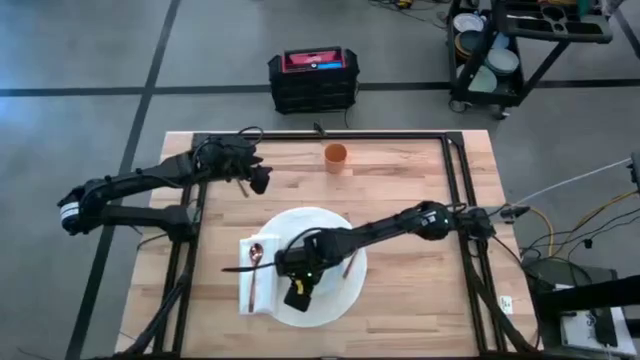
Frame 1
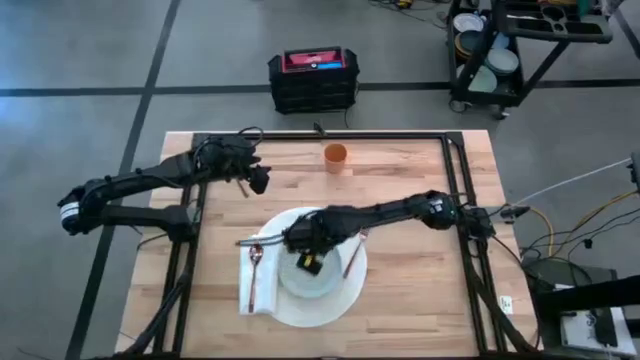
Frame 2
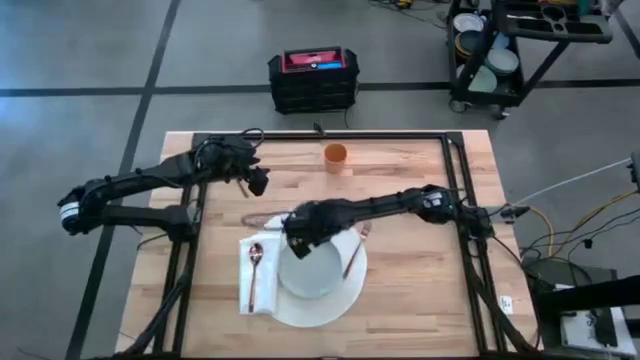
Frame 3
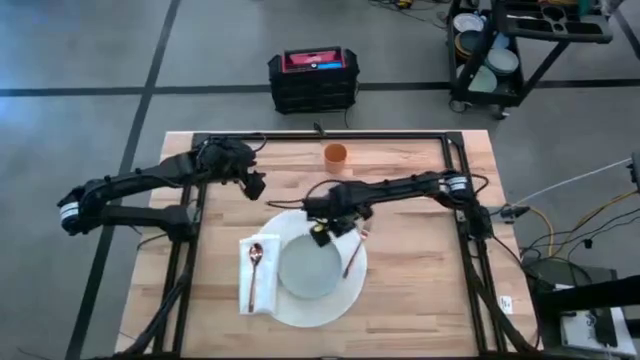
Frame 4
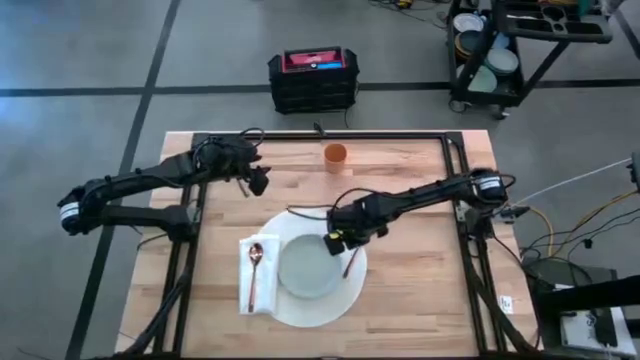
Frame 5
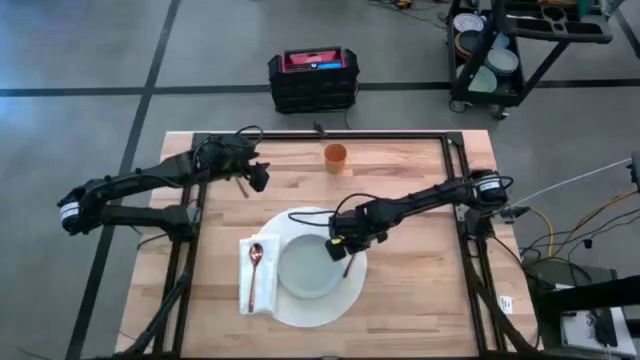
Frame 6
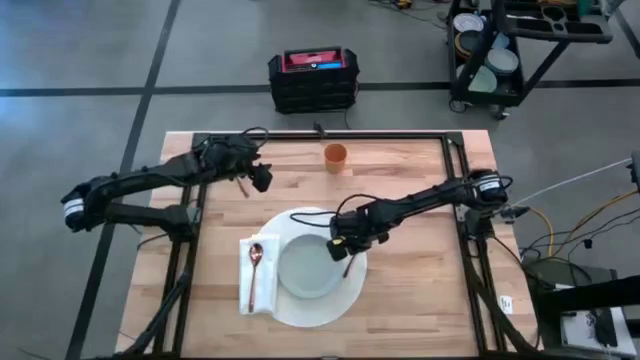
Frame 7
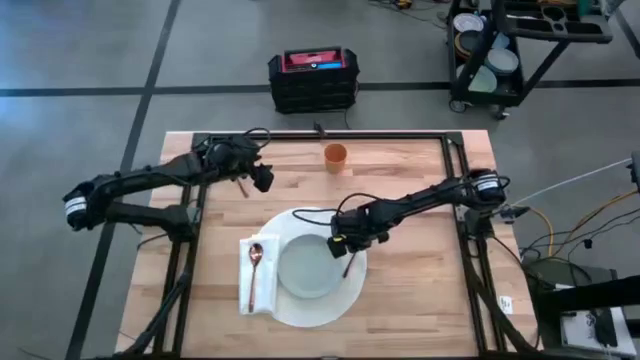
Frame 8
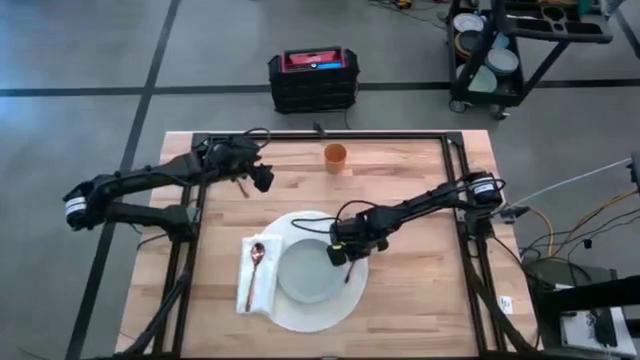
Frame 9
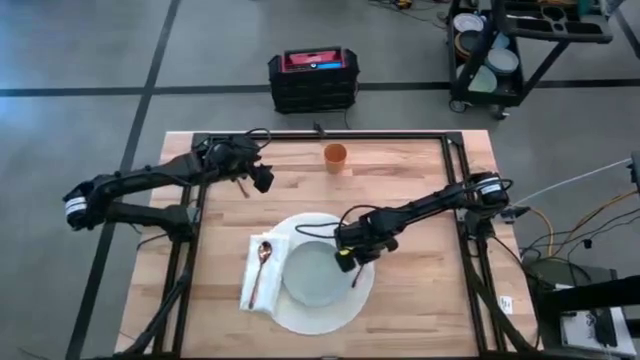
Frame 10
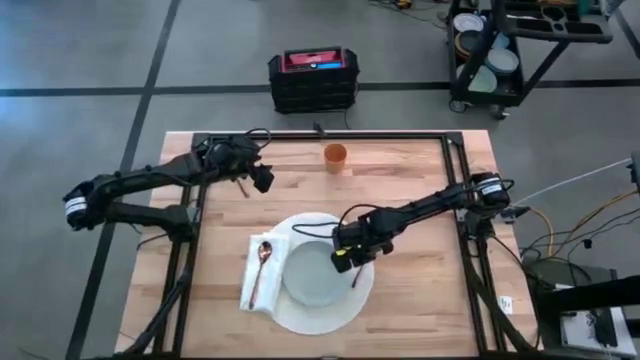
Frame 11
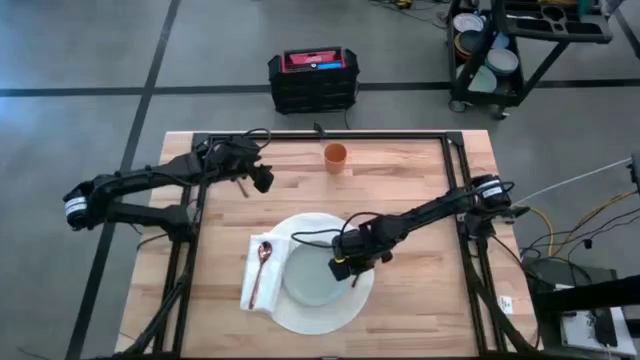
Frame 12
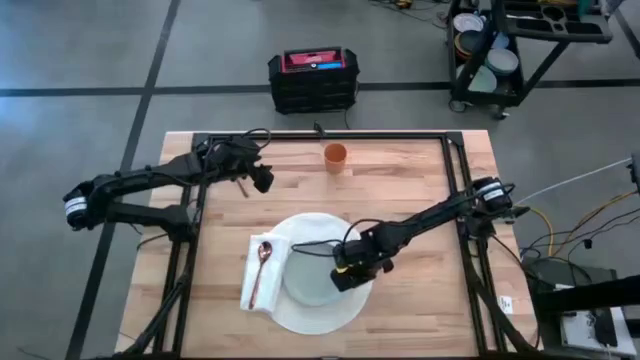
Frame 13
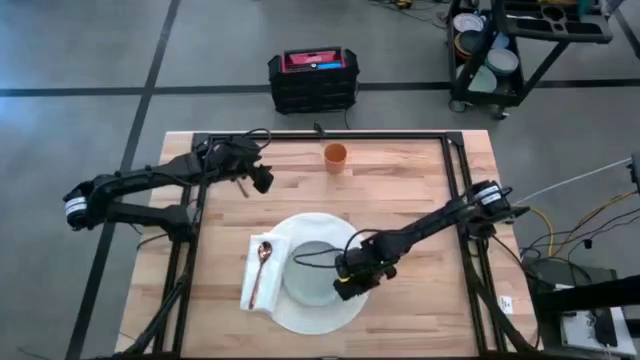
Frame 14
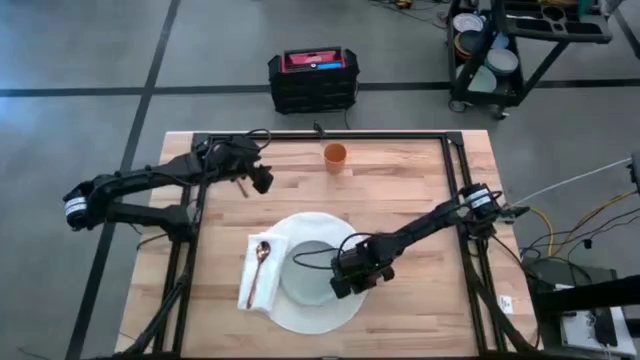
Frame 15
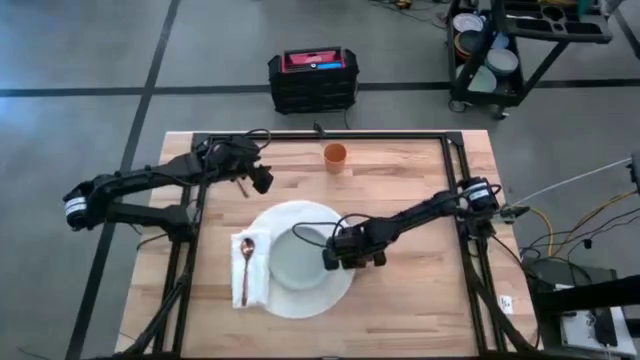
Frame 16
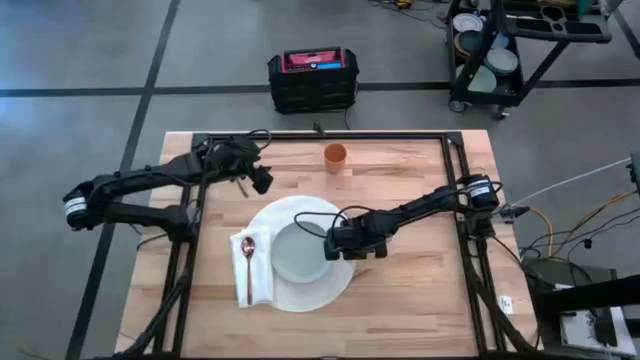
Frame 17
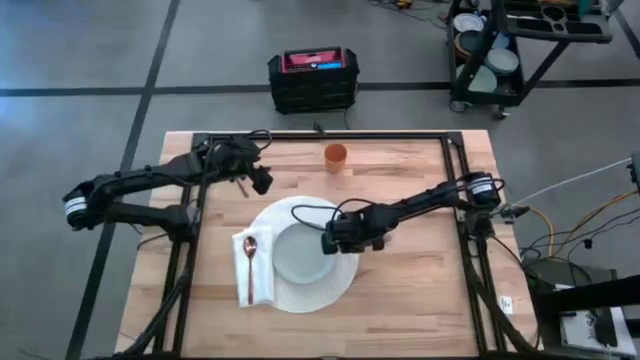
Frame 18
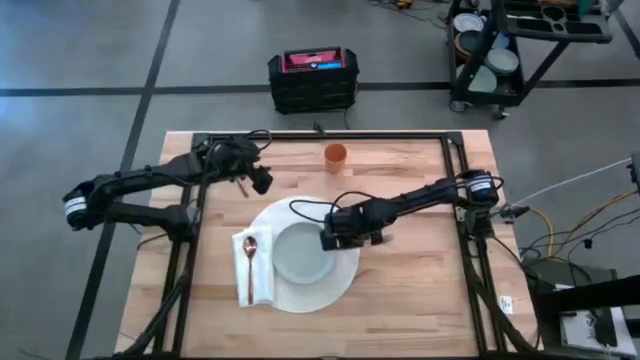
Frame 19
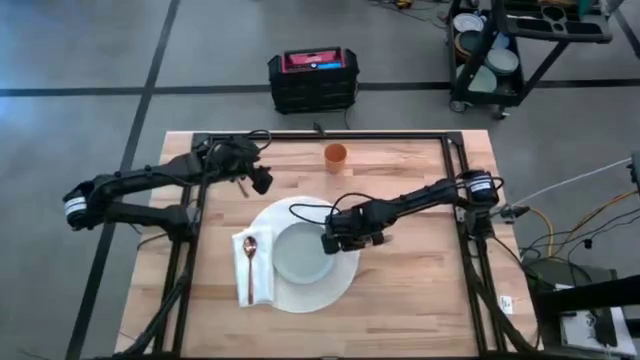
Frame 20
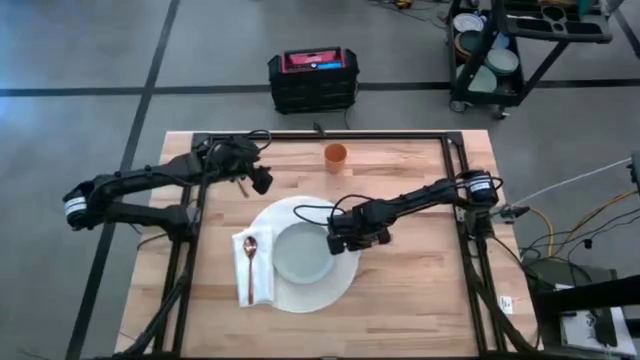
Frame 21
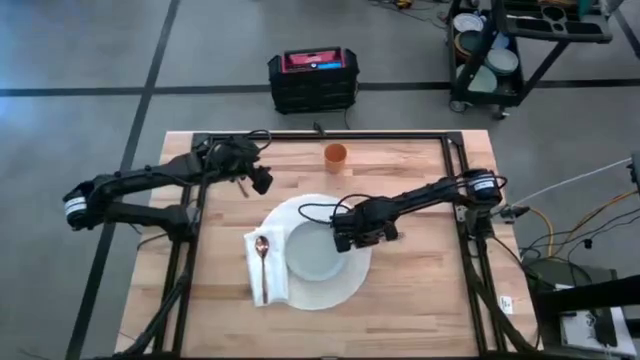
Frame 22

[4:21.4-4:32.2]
Task: Set table place
Adjust the white mat on the table

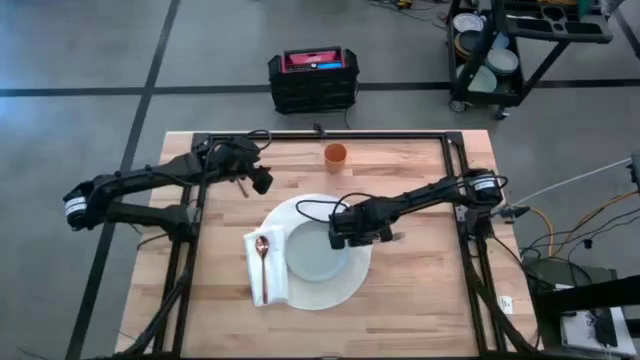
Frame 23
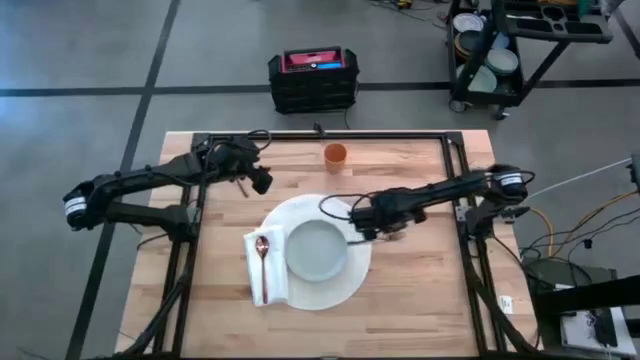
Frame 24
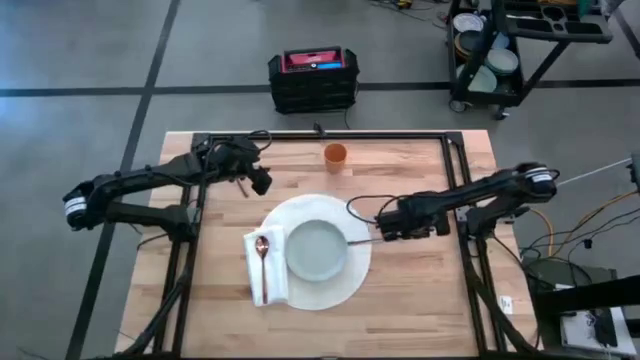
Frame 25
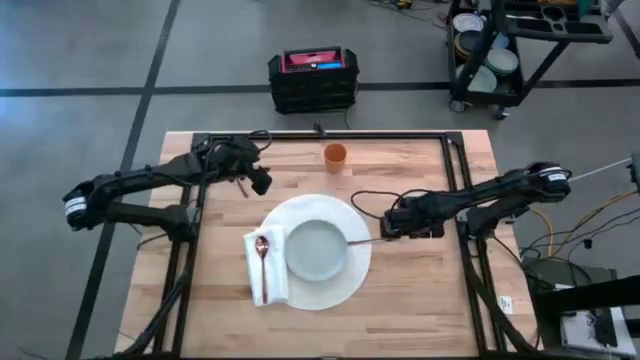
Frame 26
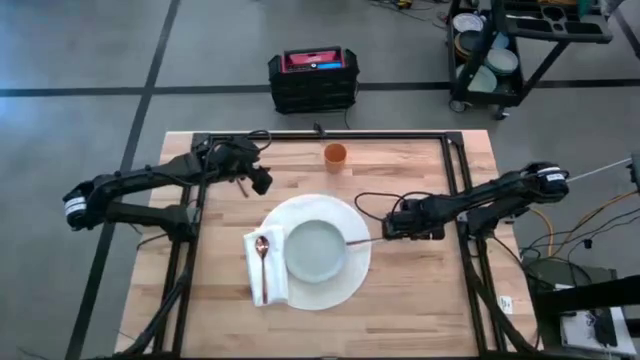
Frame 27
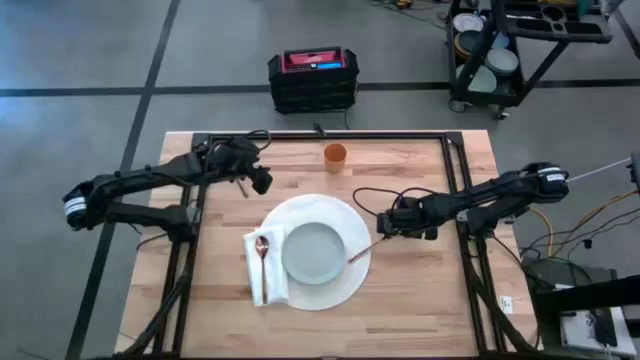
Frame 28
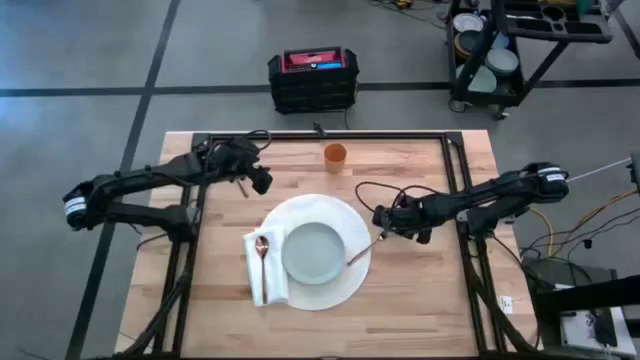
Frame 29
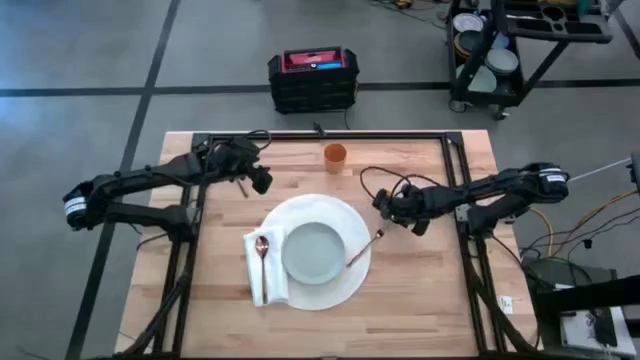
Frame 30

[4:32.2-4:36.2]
Adjust the gold fork on the mat

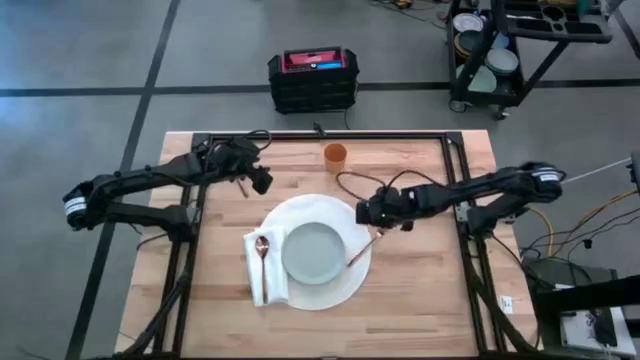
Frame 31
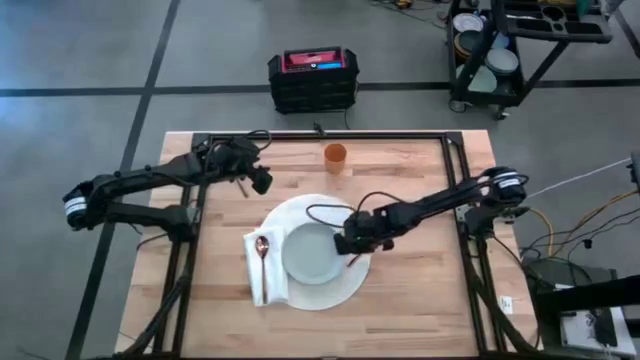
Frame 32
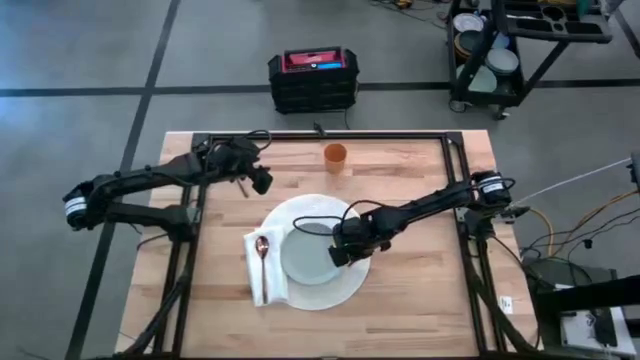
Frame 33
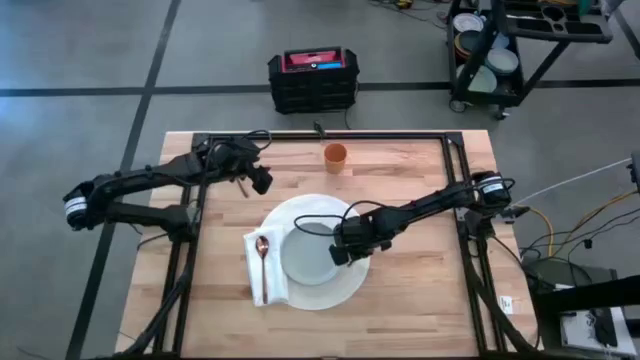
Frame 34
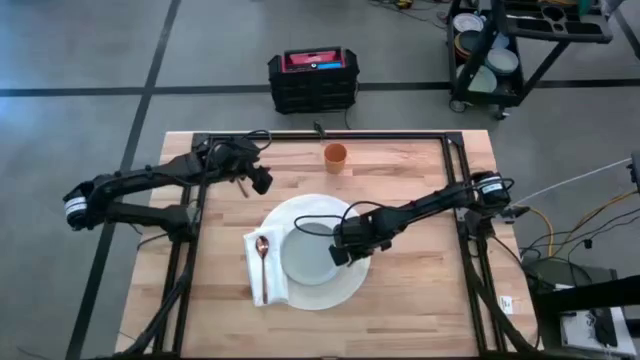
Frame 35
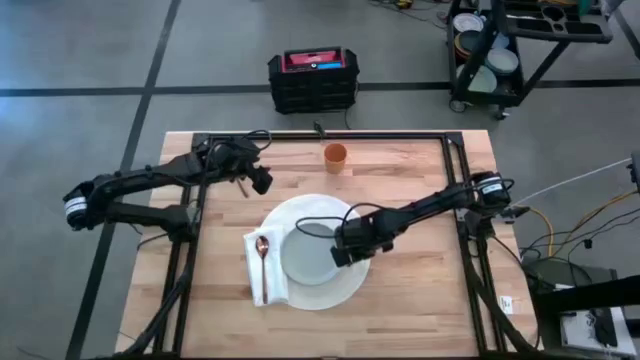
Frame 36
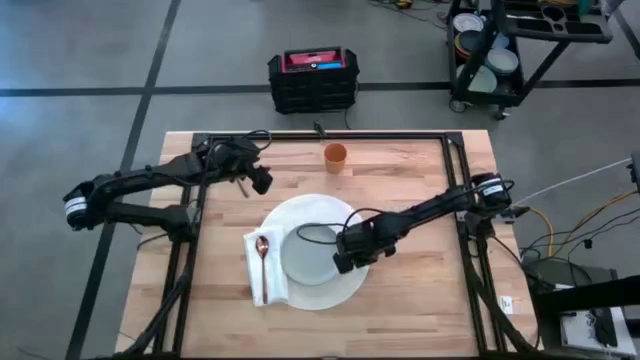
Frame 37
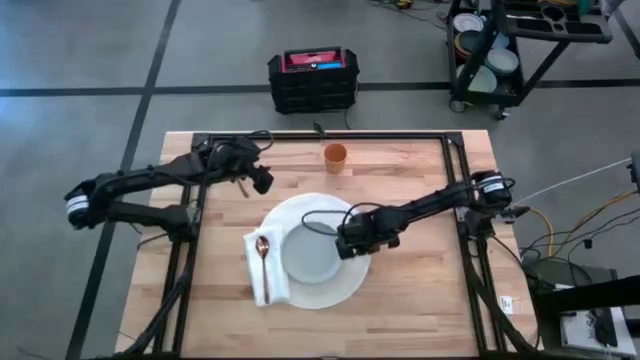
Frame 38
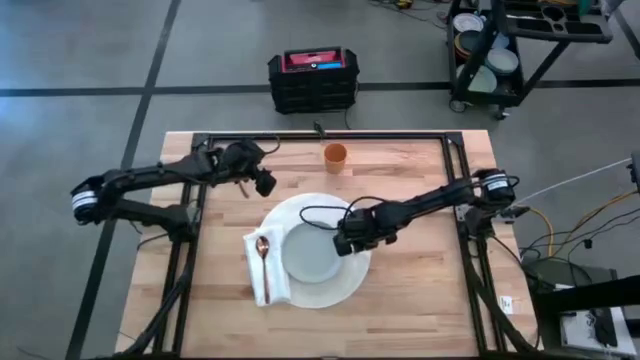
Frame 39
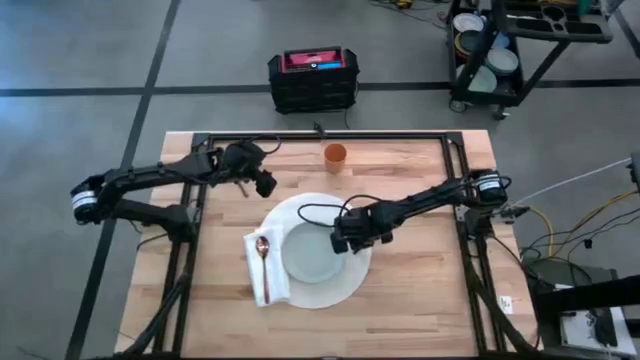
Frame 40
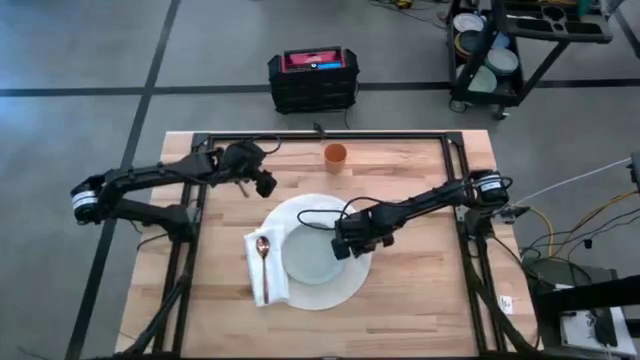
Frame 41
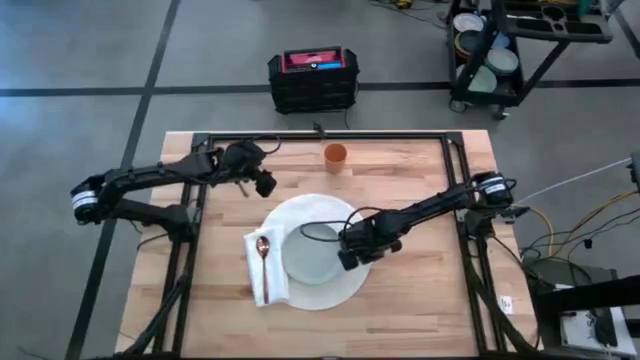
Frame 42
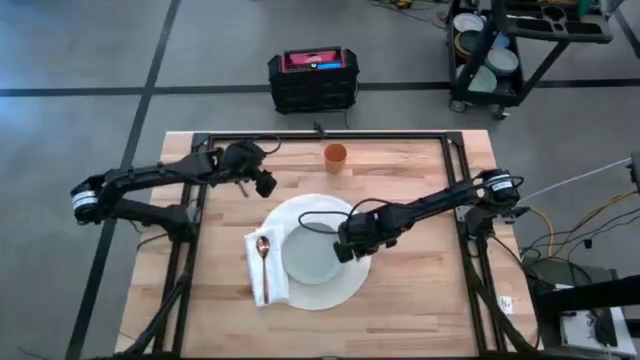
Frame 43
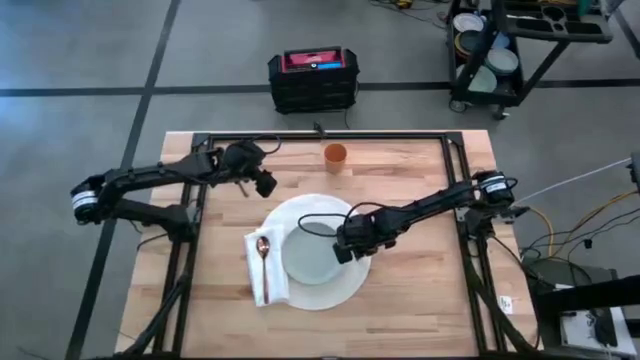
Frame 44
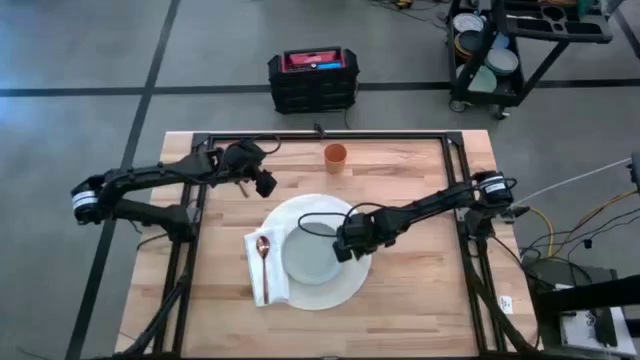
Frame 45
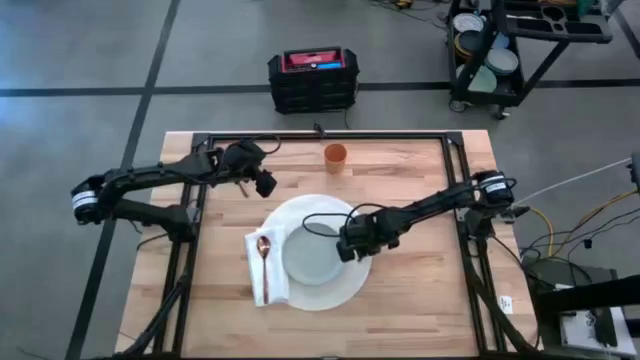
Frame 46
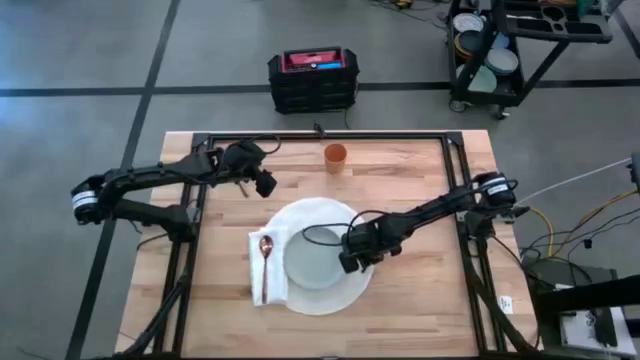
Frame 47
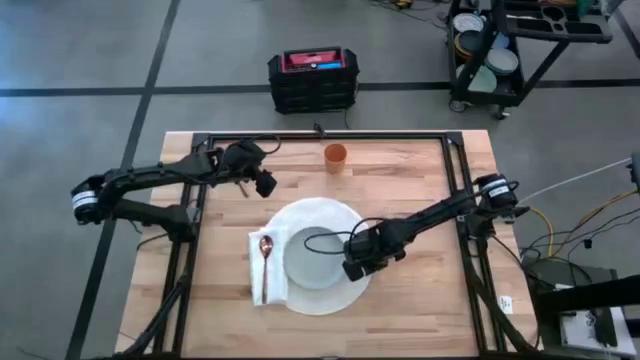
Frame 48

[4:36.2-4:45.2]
Adjust the gold fork on the mat
